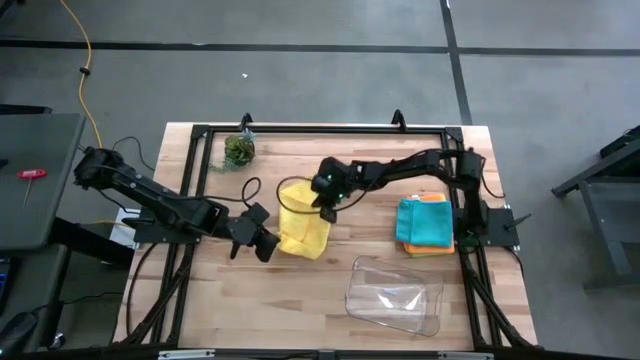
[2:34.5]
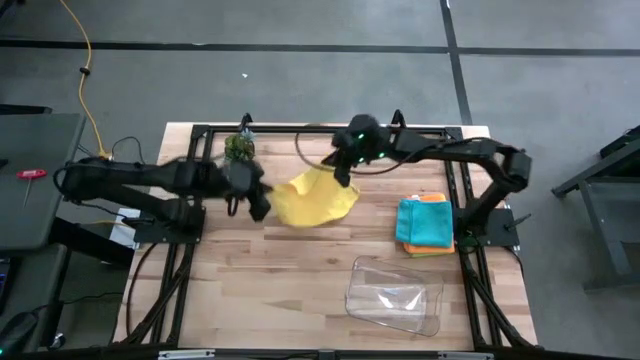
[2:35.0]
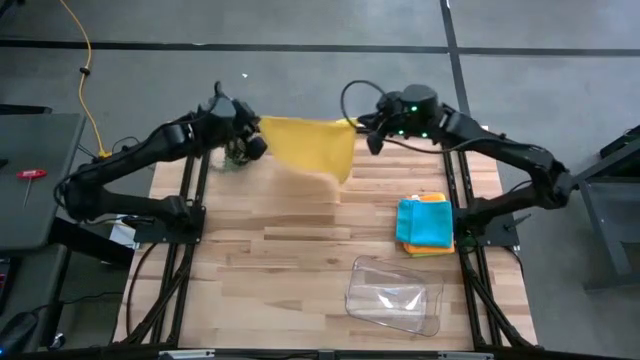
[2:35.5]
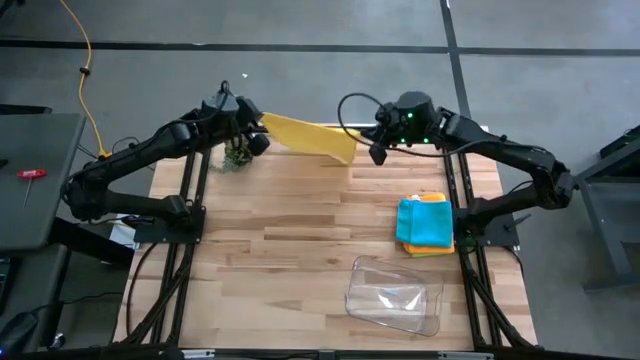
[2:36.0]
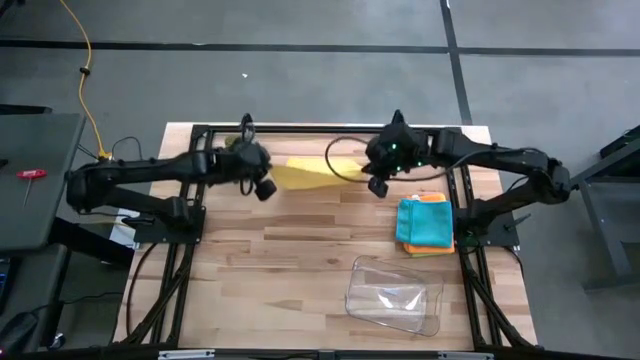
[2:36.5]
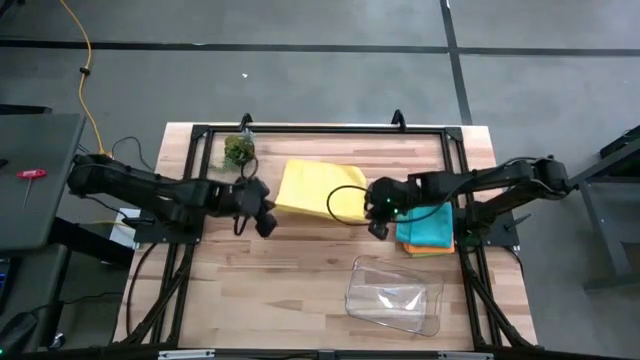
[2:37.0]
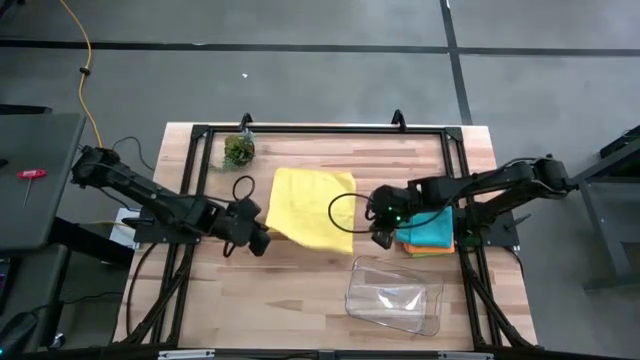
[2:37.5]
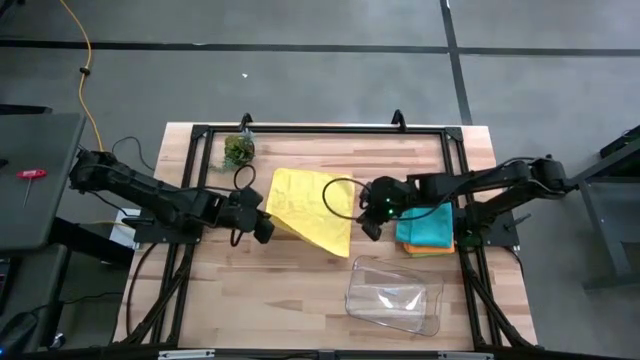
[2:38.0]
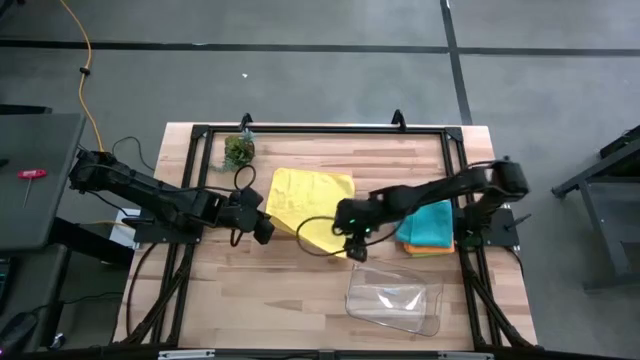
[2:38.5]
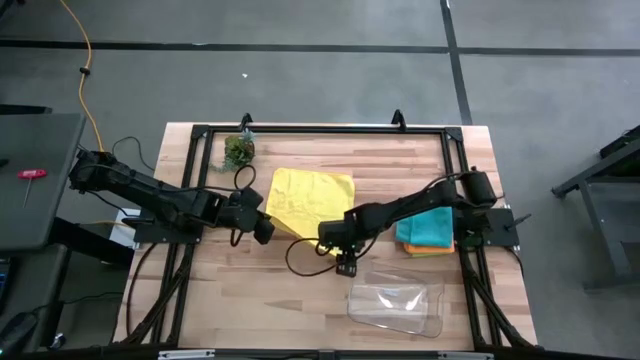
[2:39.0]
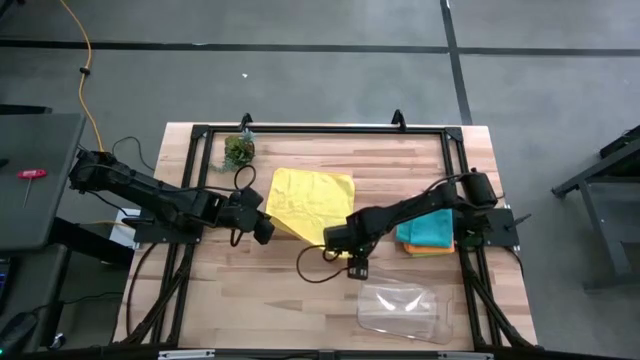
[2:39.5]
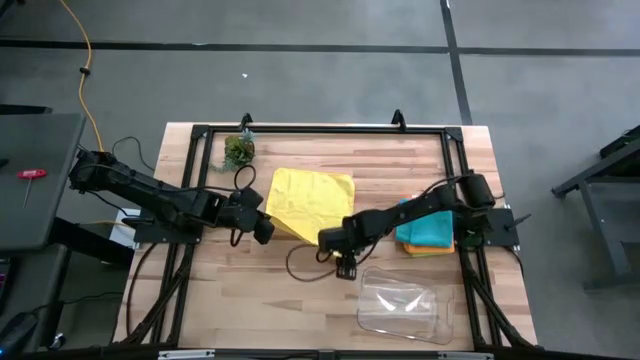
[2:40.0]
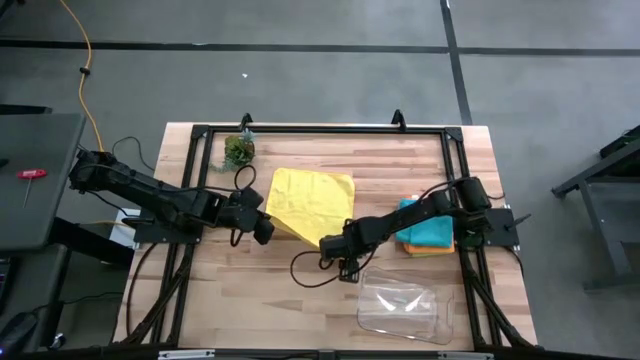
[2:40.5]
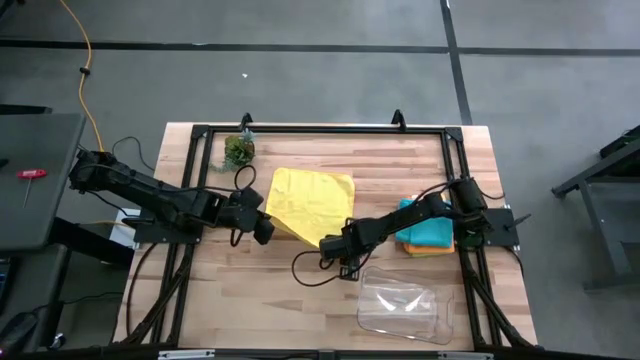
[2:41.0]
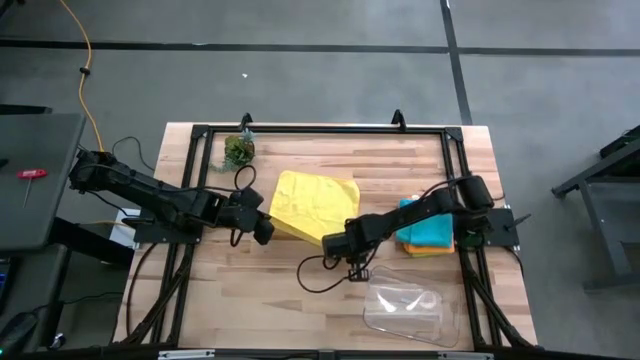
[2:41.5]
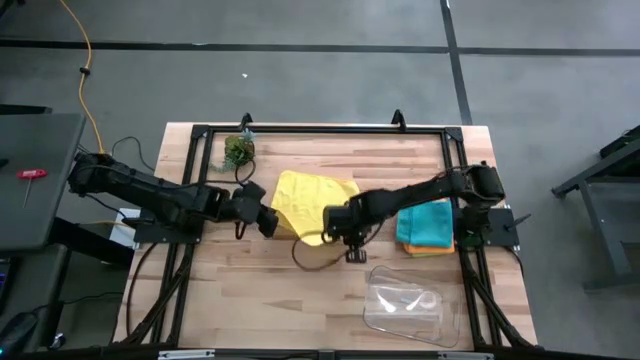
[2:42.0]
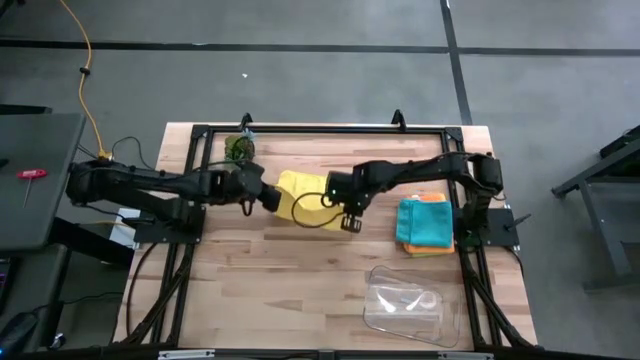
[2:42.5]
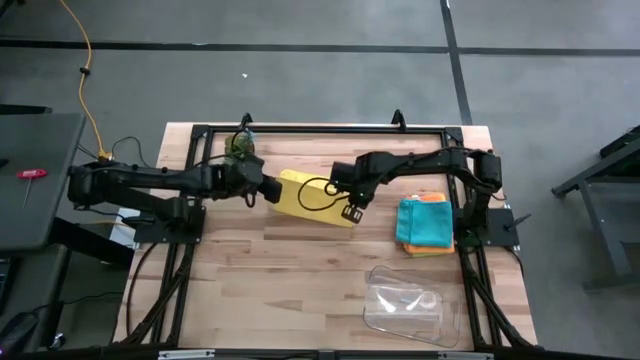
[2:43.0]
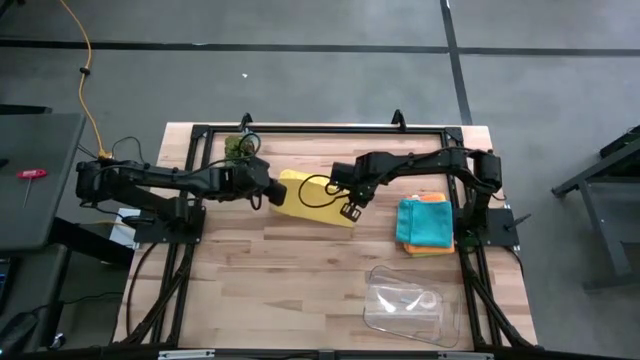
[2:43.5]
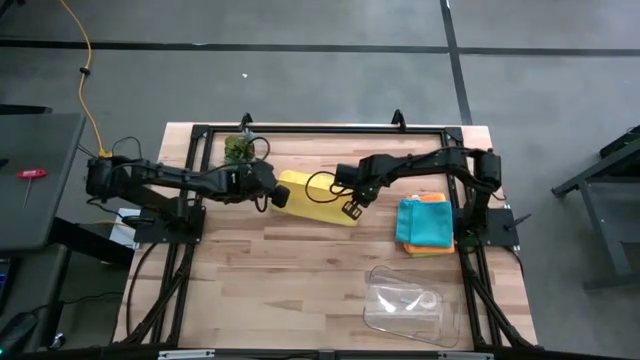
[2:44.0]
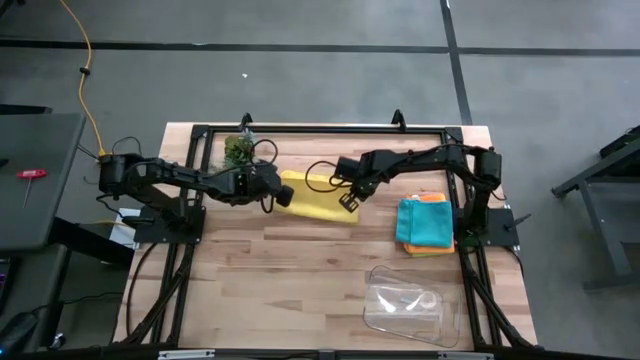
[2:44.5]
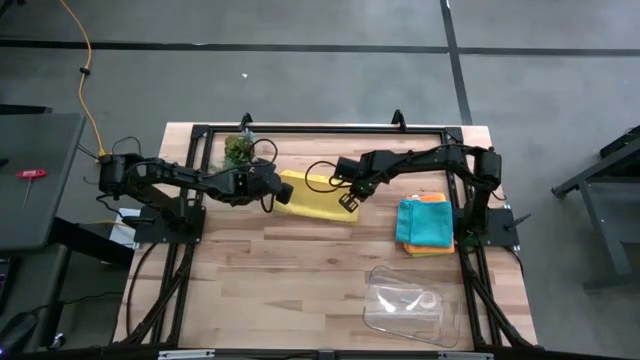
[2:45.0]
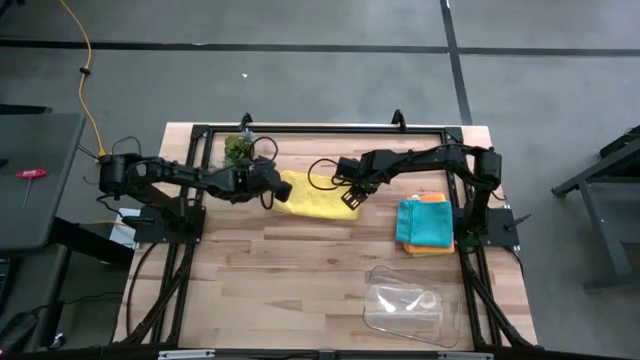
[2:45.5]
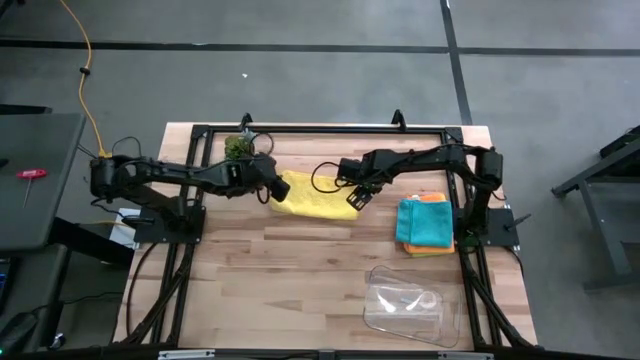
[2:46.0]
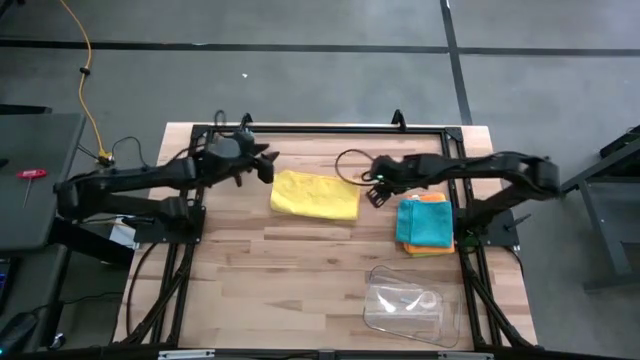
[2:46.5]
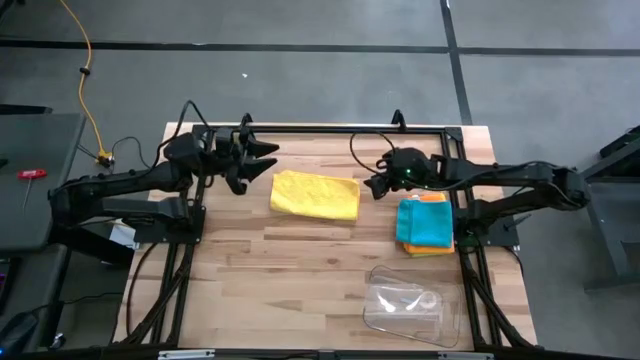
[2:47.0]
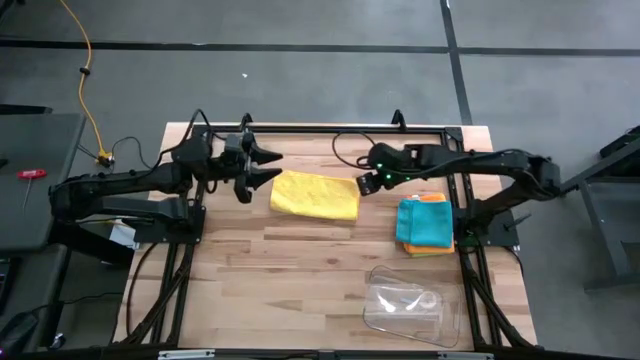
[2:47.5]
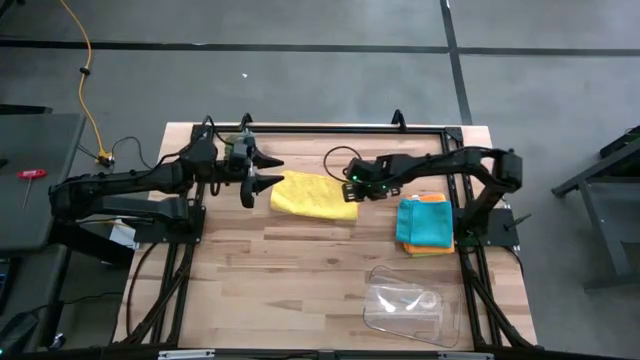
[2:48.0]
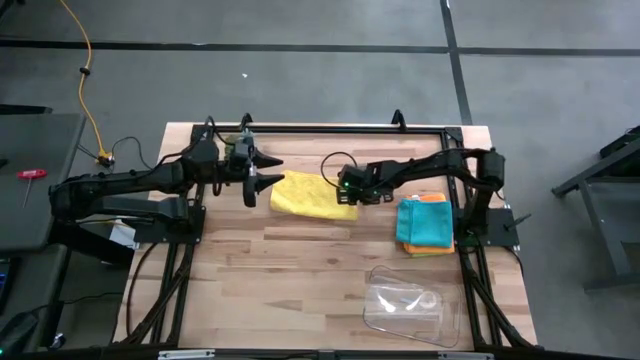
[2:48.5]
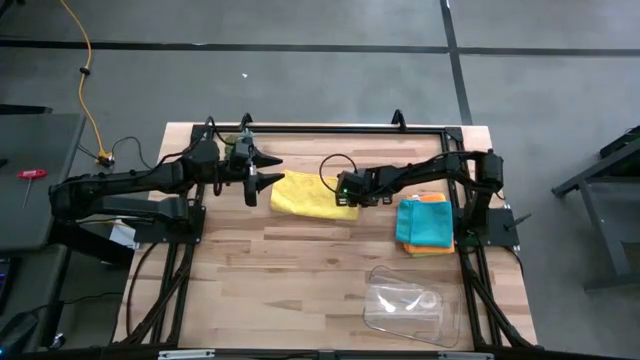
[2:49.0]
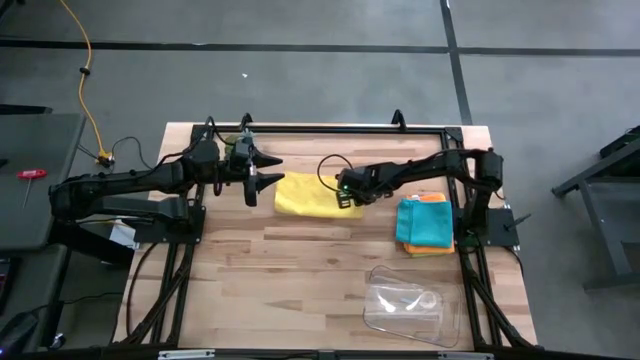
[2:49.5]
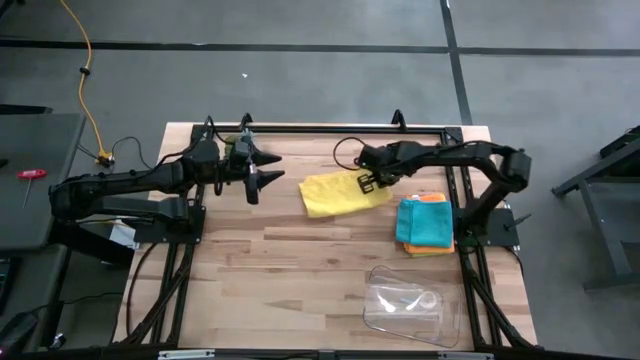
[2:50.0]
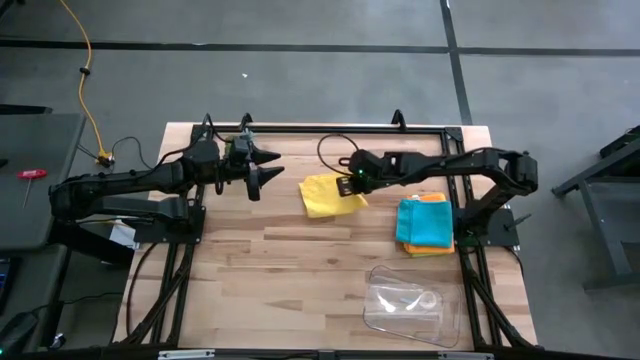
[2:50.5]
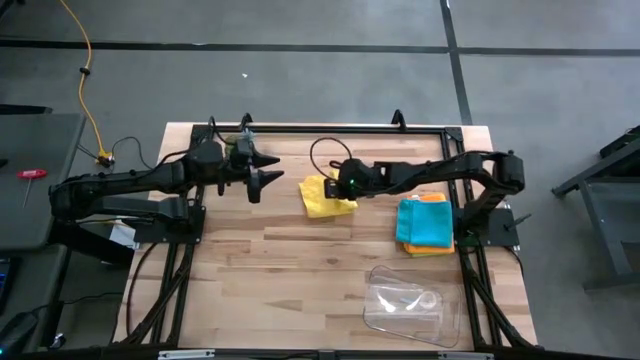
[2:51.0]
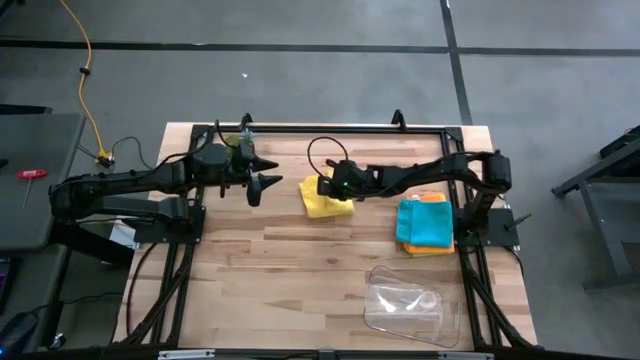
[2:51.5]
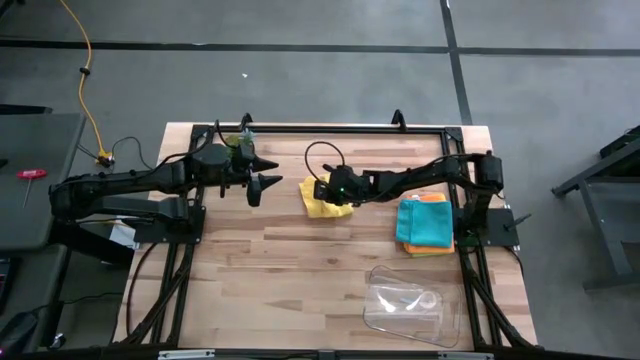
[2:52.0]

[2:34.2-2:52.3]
Task: Fold microfiber towels
Fold the yellow cloth

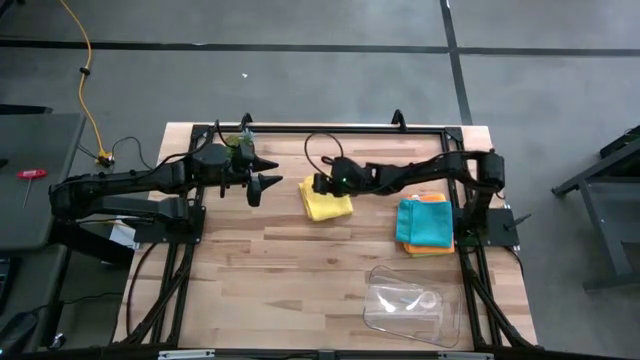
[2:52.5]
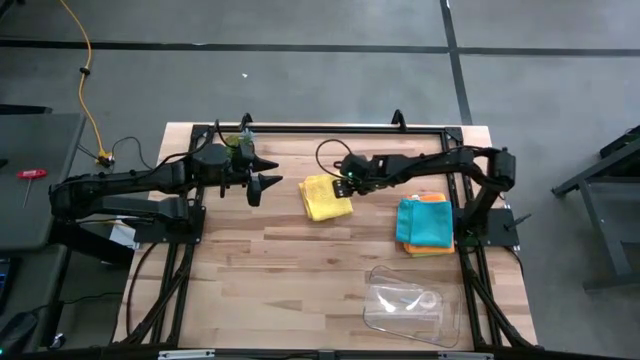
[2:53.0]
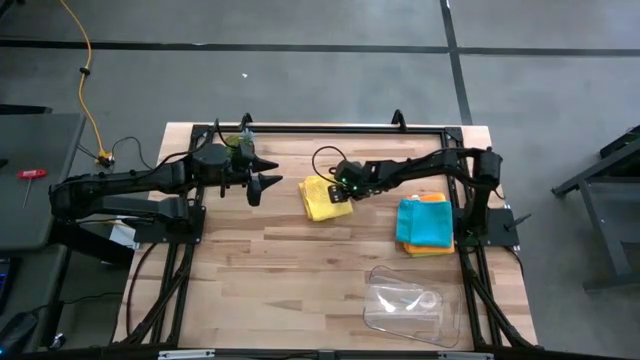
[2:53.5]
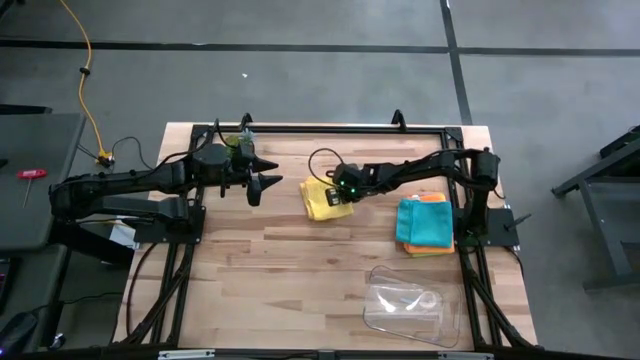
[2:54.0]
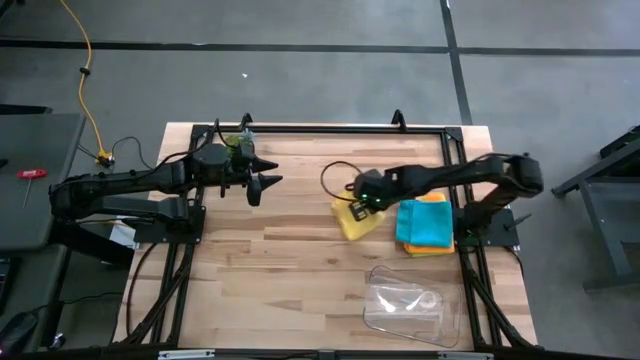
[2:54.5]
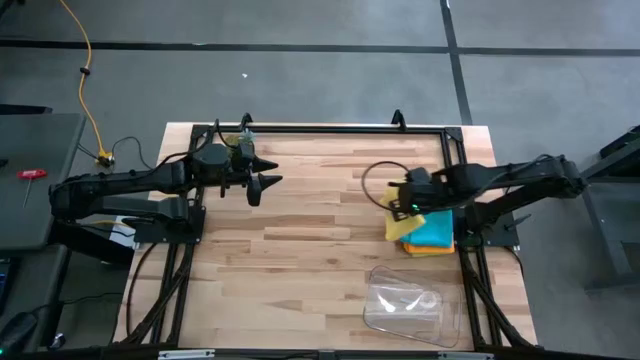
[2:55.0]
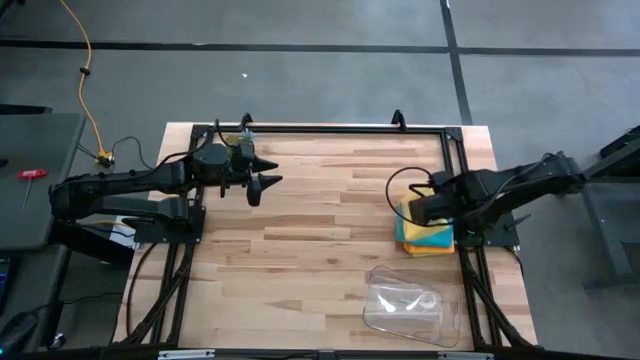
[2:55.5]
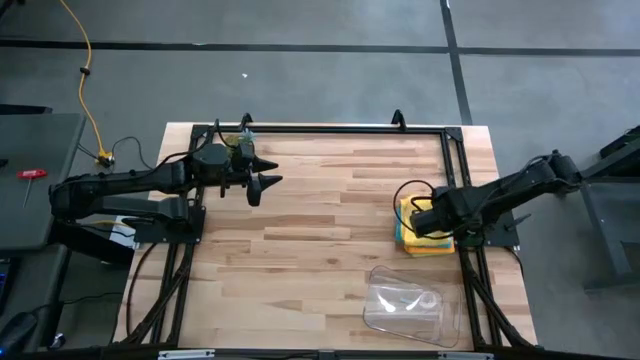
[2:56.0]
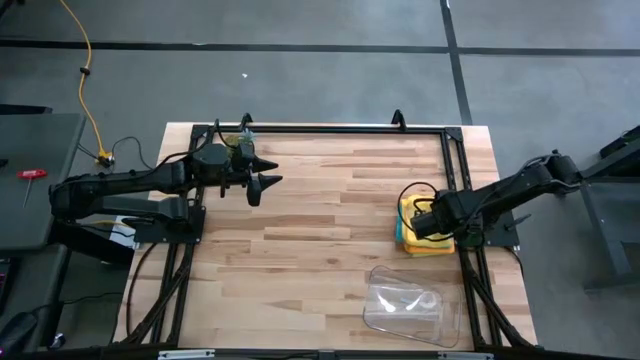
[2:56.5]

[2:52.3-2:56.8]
Stack the yellow cloth on the blue cloth
